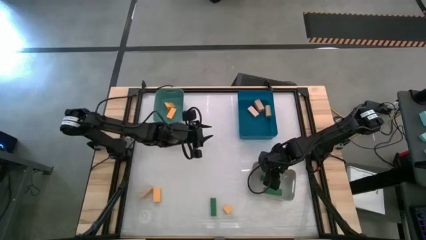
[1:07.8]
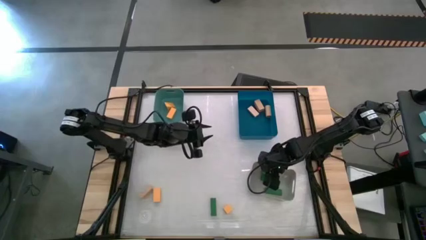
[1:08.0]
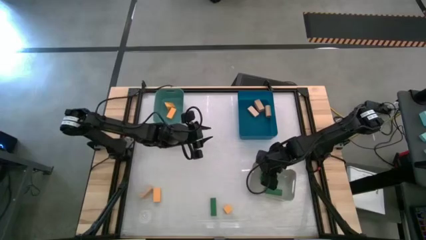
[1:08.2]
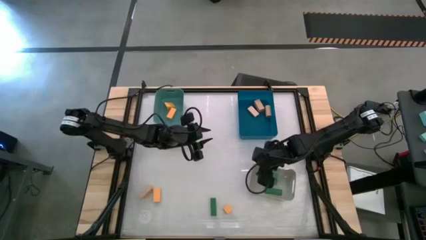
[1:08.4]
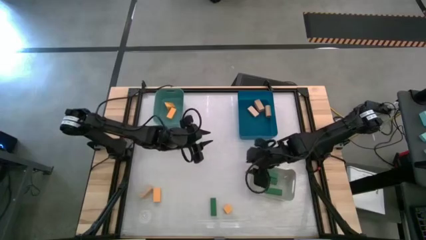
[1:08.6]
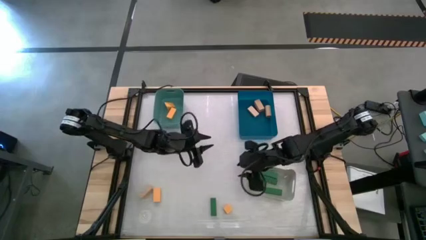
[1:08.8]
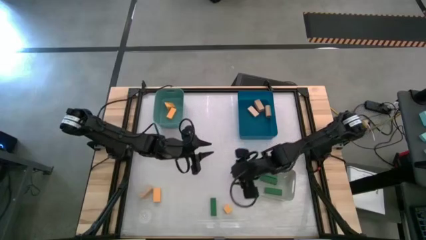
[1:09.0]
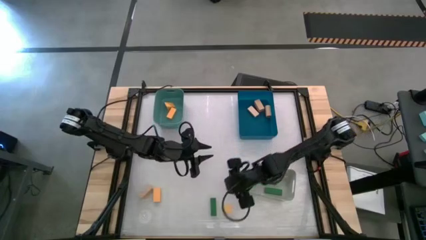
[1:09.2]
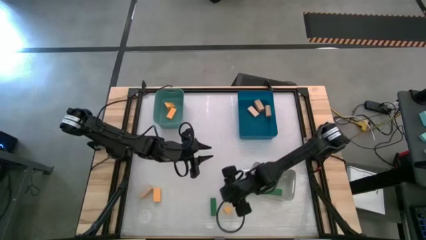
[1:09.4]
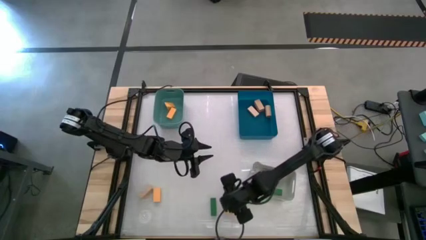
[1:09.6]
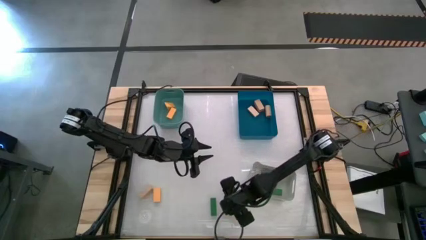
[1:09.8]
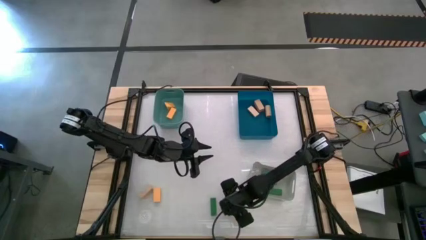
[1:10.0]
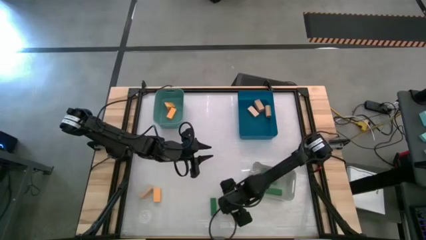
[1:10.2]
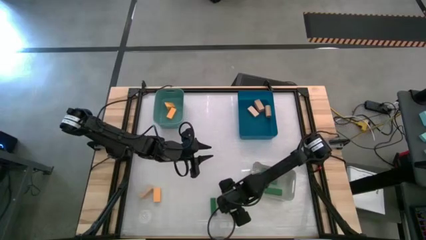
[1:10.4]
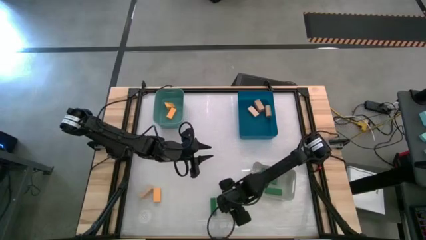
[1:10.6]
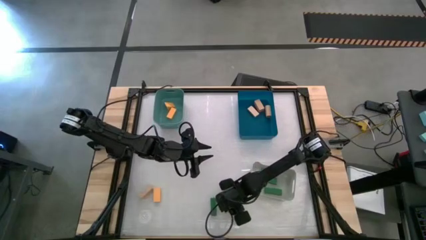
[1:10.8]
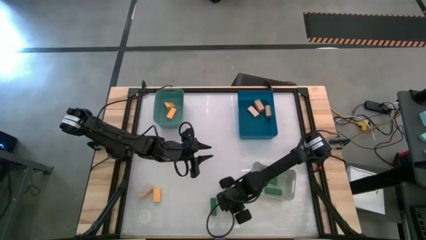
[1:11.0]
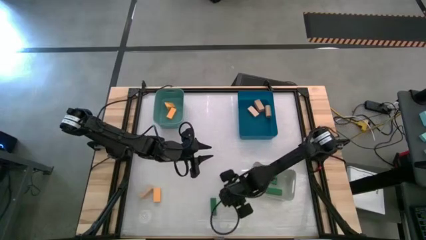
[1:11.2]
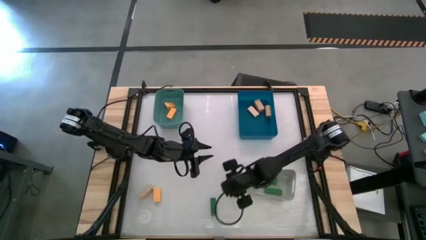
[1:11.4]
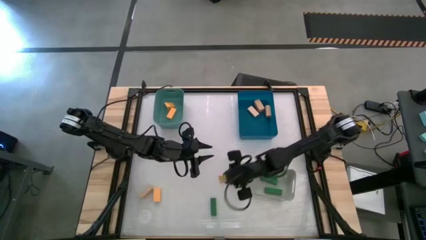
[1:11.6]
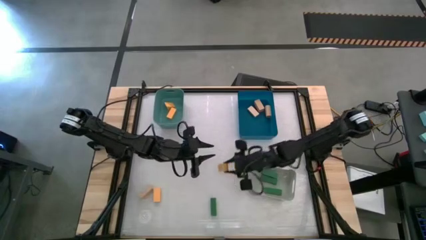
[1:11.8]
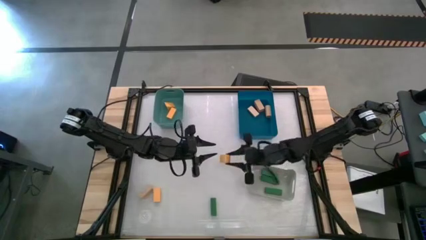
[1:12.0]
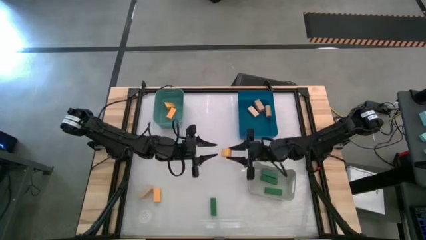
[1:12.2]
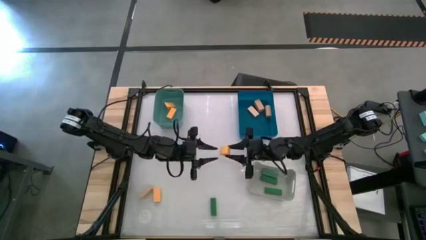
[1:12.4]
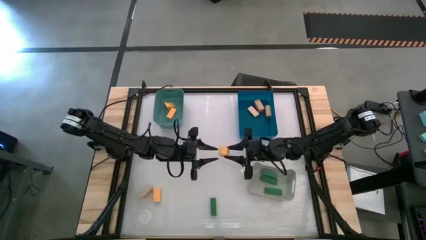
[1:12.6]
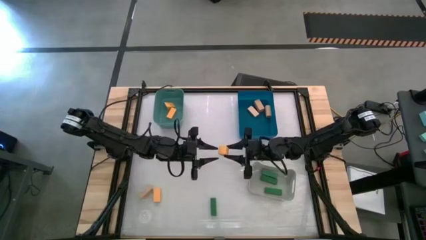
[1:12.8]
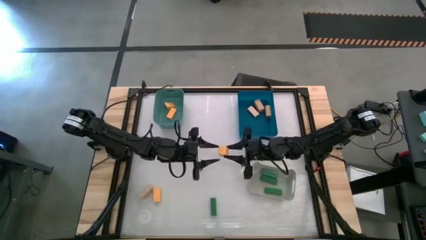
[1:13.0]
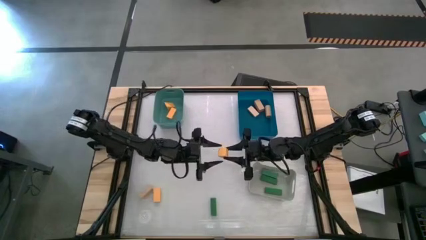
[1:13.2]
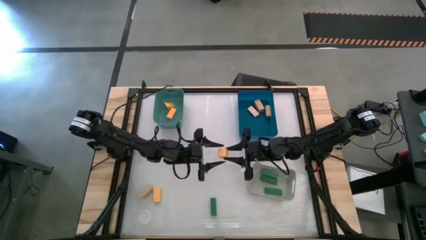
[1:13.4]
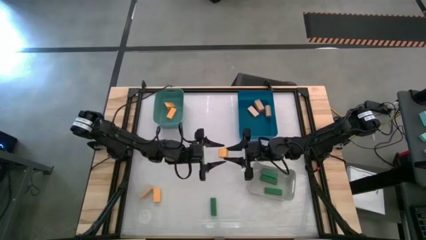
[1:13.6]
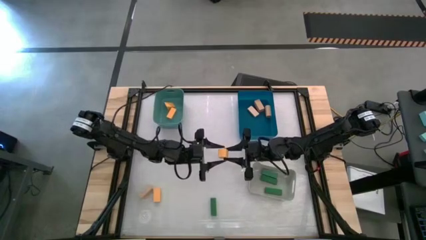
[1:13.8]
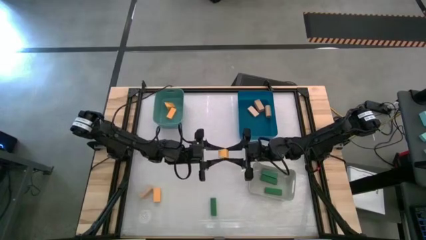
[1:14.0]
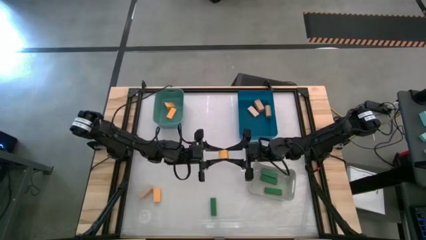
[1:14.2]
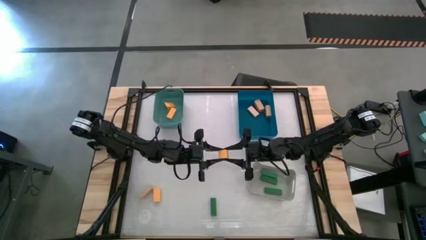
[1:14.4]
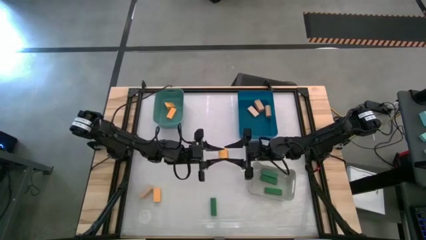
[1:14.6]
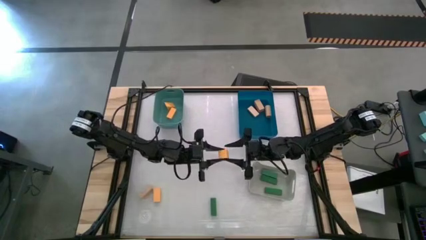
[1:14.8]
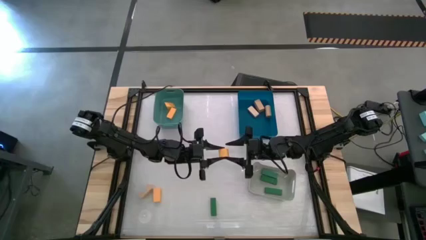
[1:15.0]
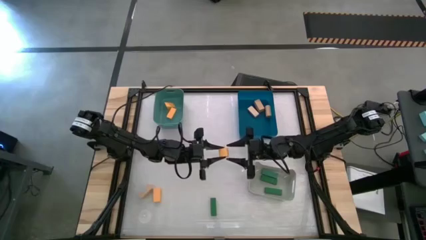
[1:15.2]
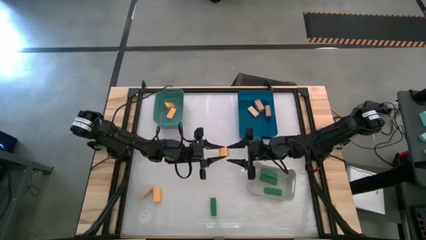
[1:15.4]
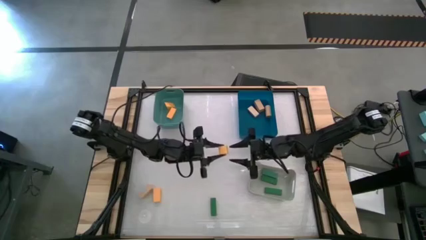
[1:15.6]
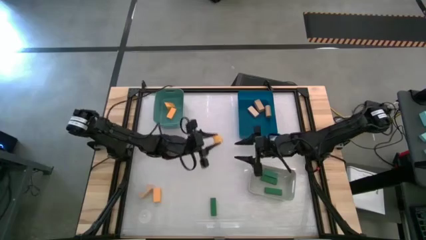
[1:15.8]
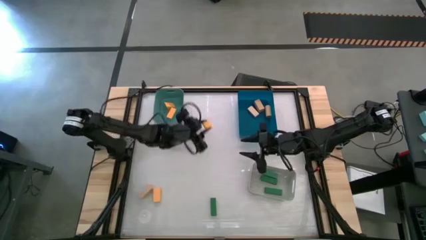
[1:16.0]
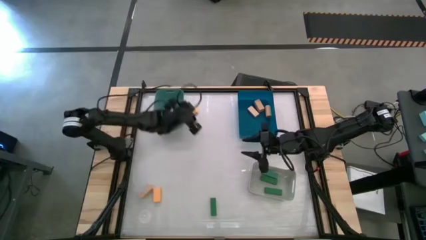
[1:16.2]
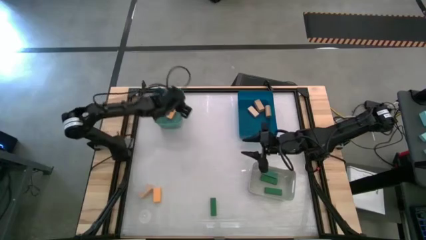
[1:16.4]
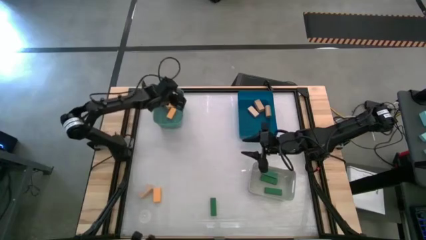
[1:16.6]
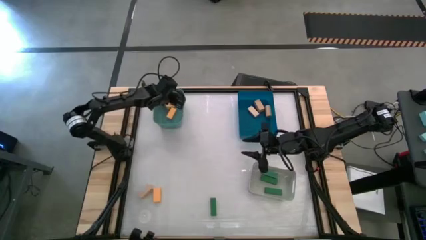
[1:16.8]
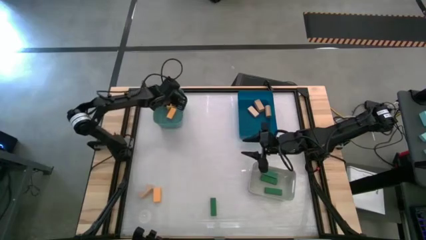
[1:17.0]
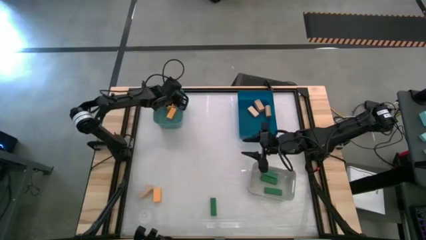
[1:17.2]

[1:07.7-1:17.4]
Task: Sort & place blocks by color
Put the yellow wooden block into the light blue bin

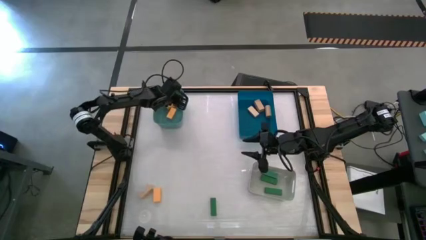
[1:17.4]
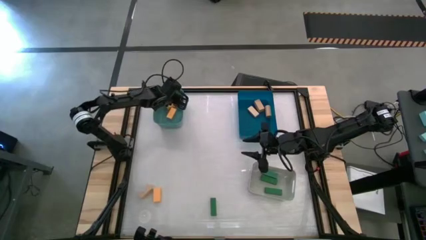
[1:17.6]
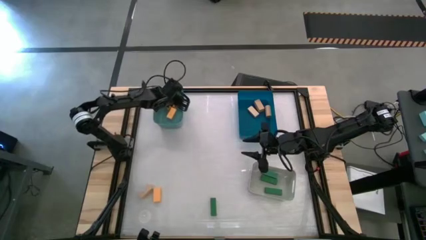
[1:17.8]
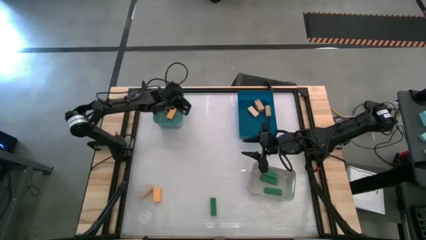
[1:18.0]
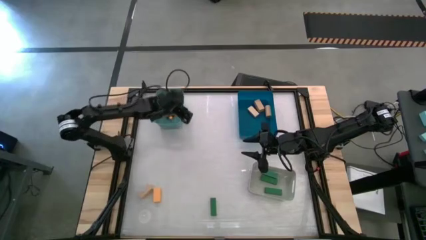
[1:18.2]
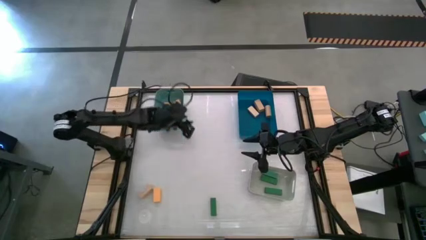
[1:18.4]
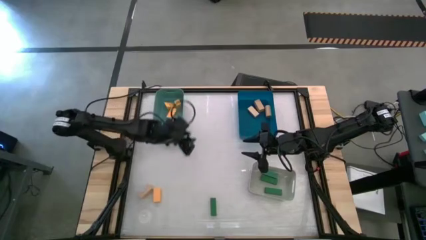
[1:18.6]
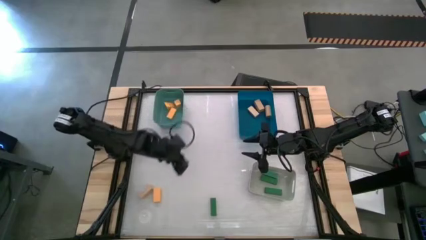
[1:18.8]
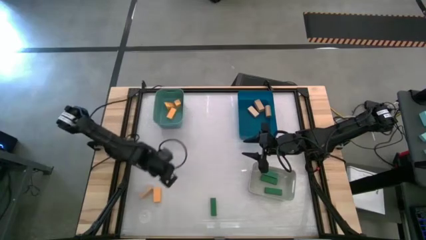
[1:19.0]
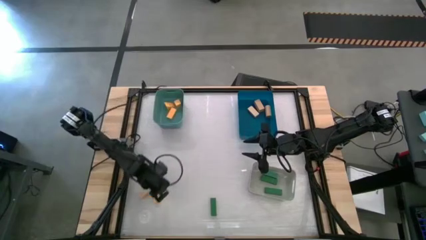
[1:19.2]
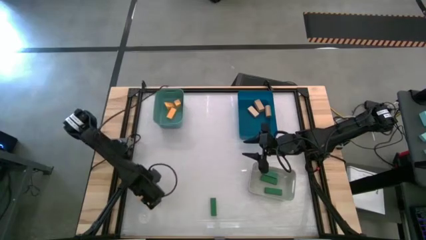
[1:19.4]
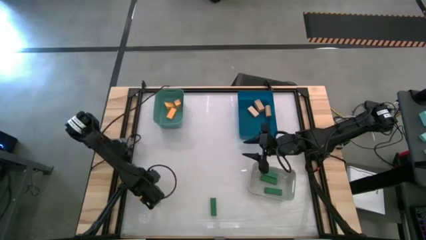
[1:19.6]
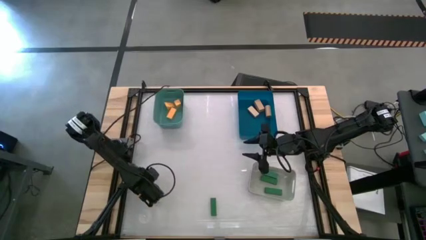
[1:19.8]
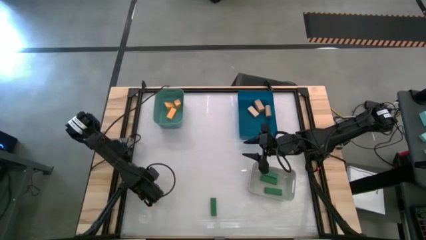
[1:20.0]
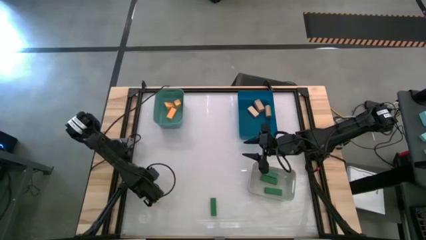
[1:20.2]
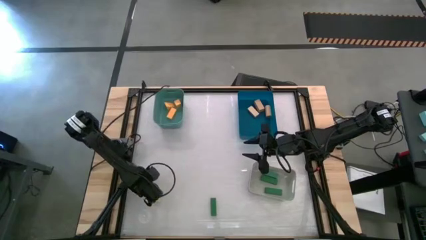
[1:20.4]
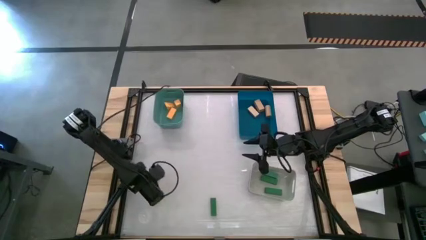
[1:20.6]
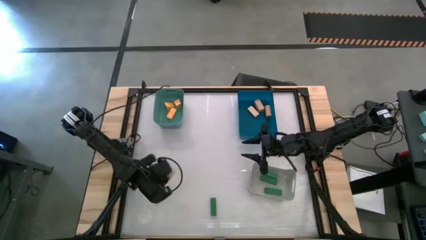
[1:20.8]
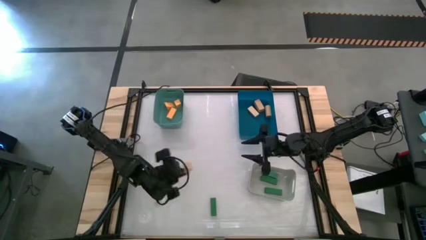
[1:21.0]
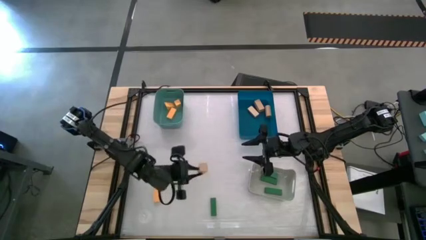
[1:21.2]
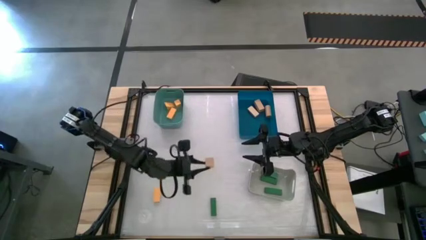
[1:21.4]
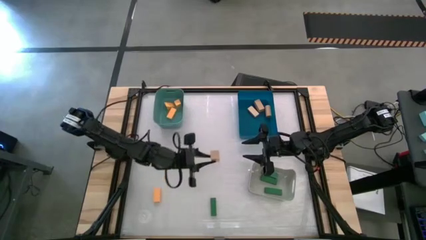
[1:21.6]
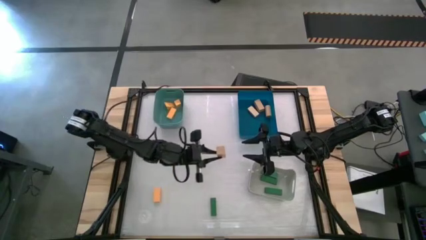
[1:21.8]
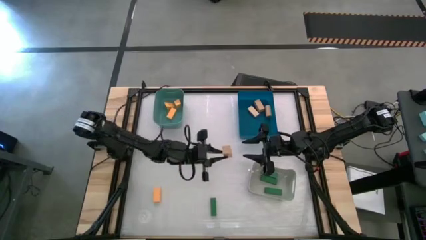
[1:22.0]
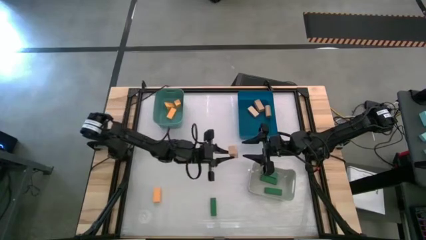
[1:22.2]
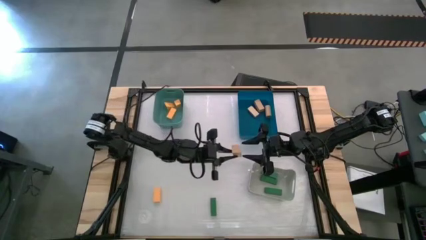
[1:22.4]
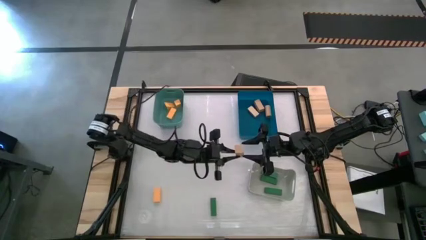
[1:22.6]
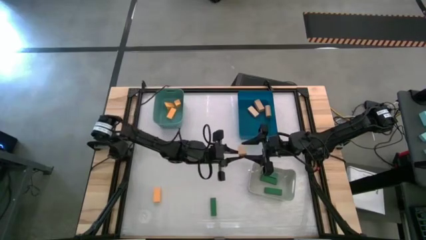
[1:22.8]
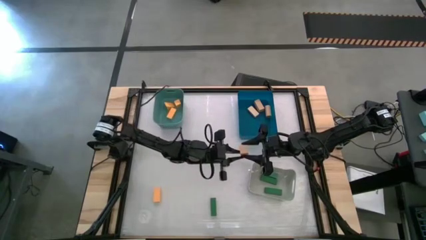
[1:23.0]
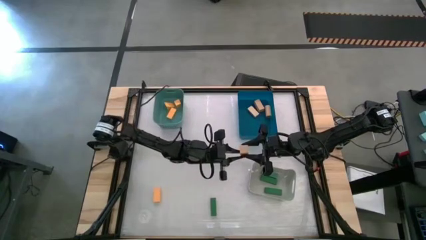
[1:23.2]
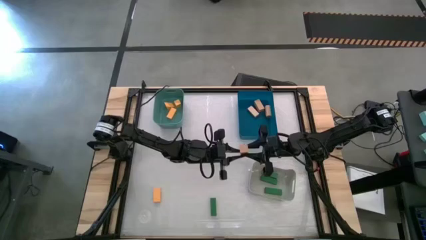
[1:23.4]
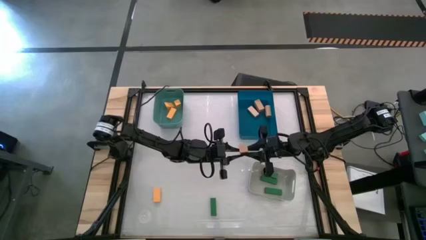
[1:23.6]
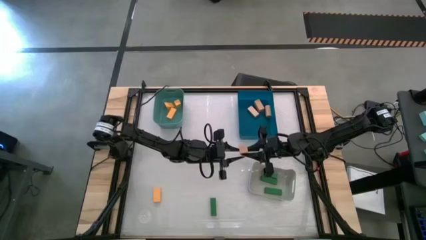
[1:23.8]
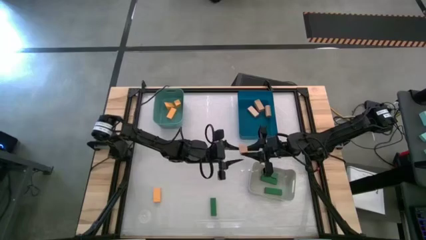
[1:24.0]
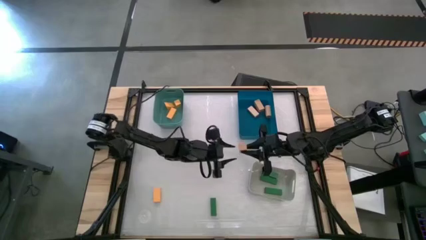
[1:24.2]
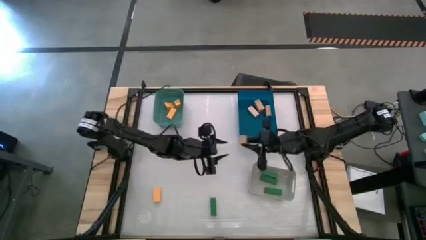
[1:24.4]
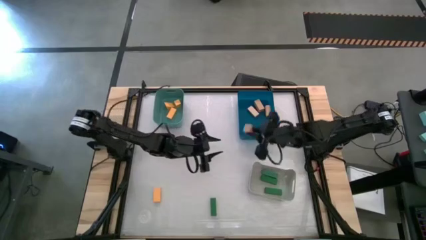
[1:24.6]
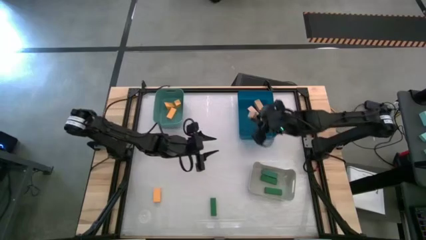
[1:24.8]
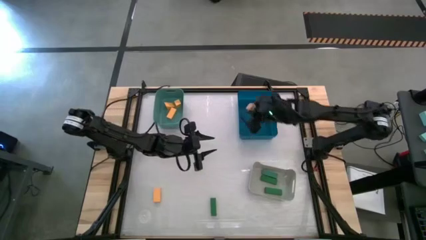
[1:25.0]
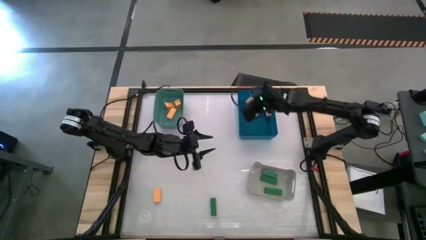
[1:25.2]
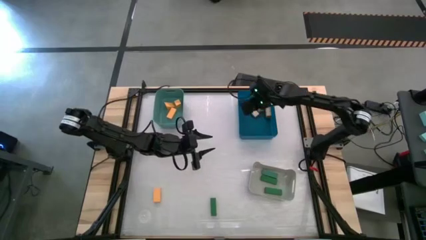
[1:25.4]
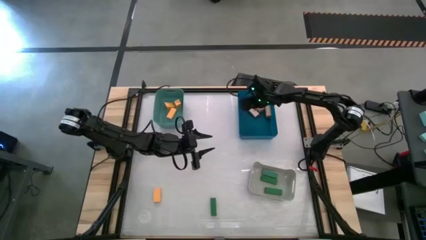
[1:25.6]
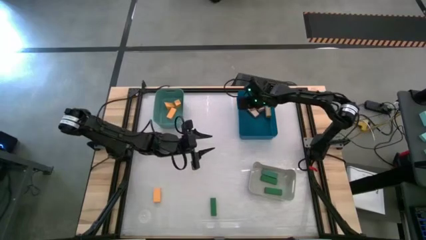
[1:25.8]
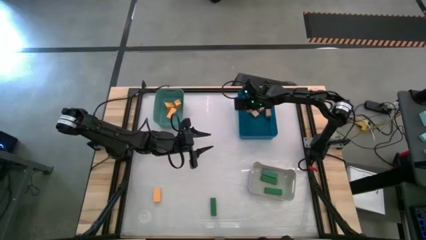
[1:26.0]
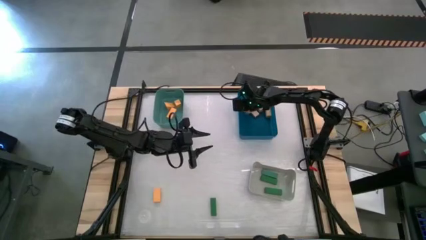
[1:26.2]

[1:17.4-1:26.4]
Put the brown wooden block into the dark blue bin
